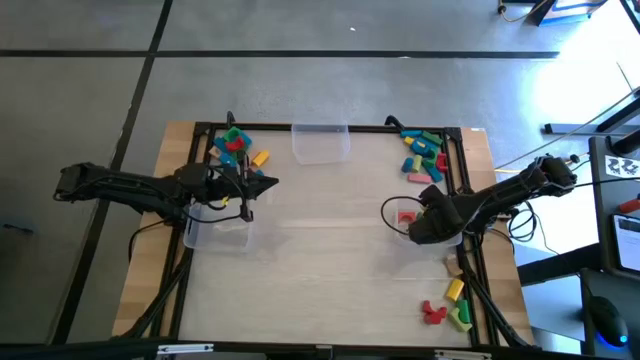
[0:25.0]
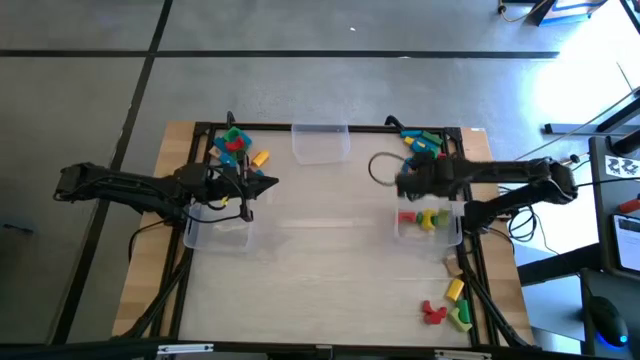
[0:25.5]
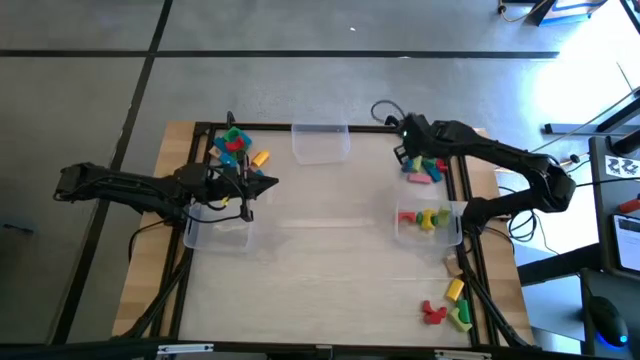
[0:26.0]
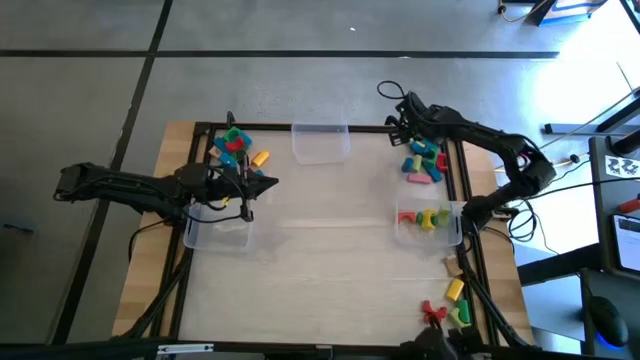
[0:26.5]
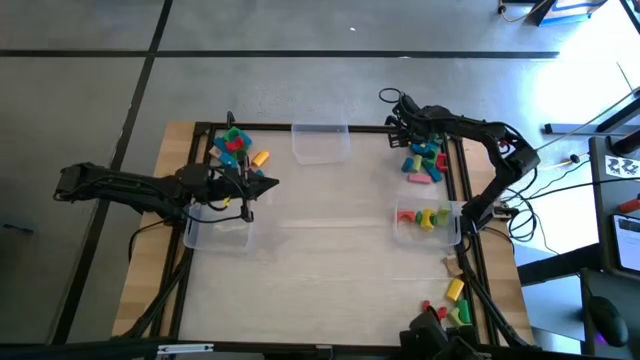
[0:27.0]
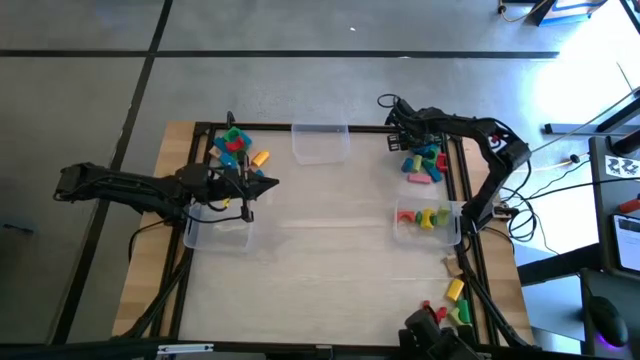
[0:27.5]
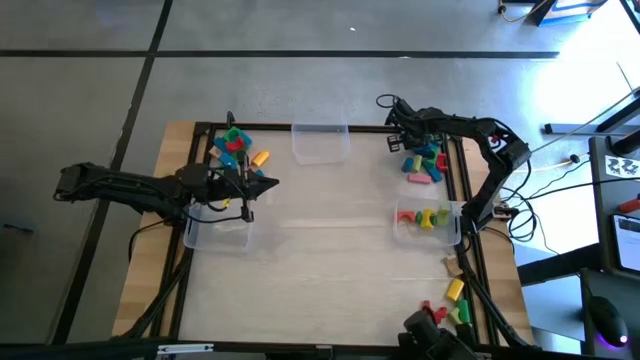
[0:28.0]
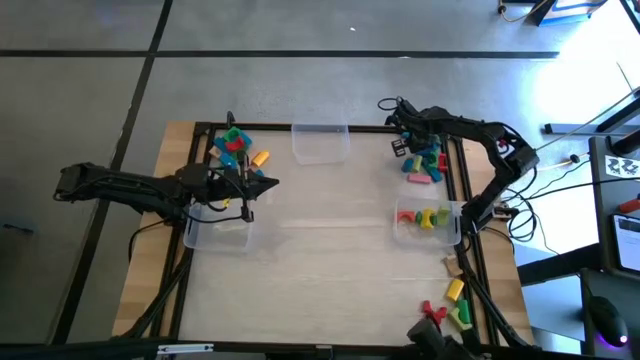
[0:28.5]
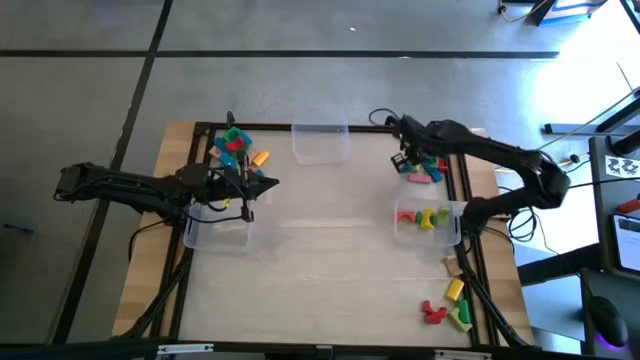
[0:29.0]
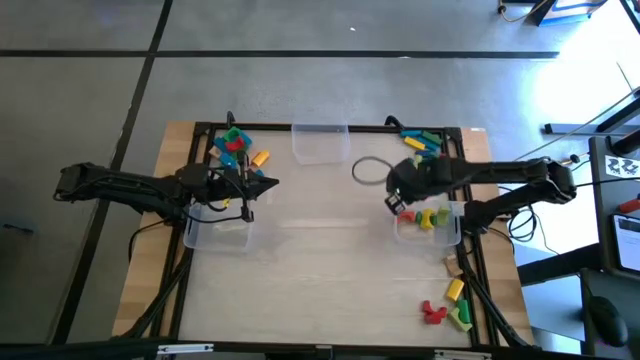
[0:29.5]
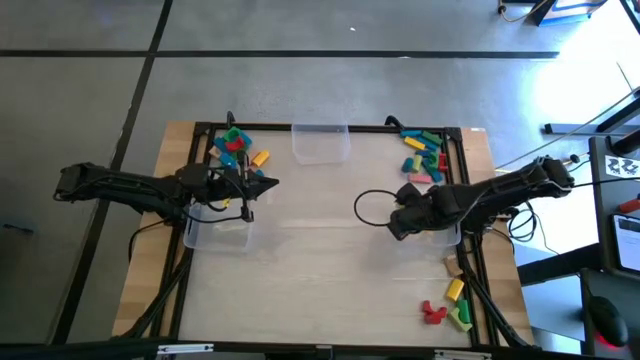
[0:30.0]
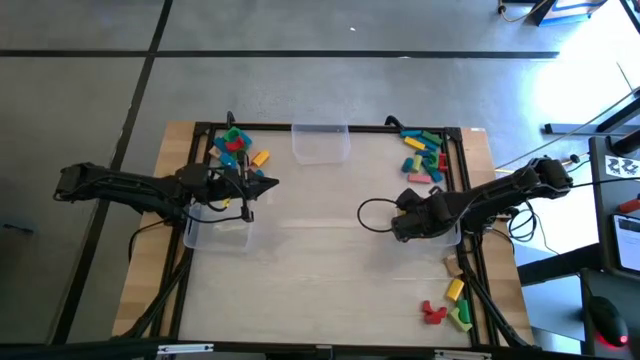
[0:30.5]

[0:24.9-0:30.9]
Task: Sort blocks by size
Put the blue arch block into the bottom right transparent bin

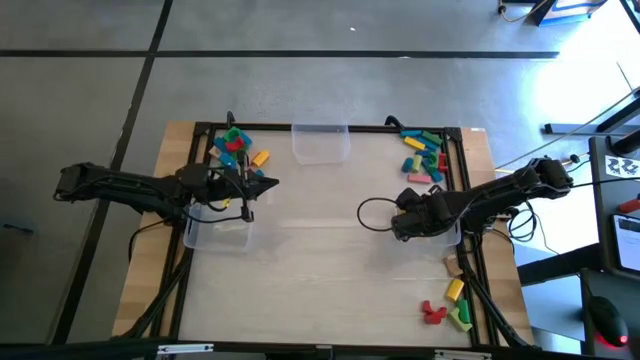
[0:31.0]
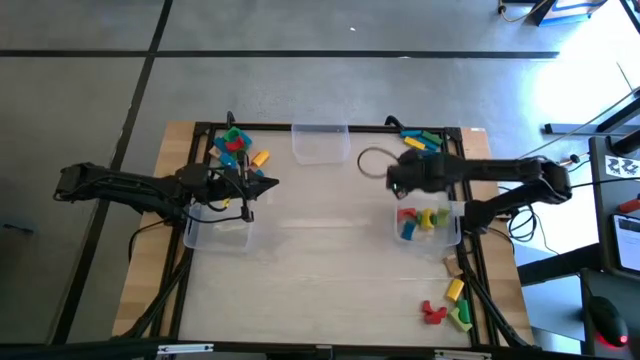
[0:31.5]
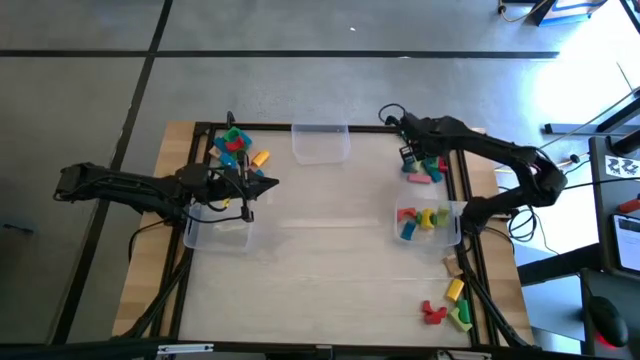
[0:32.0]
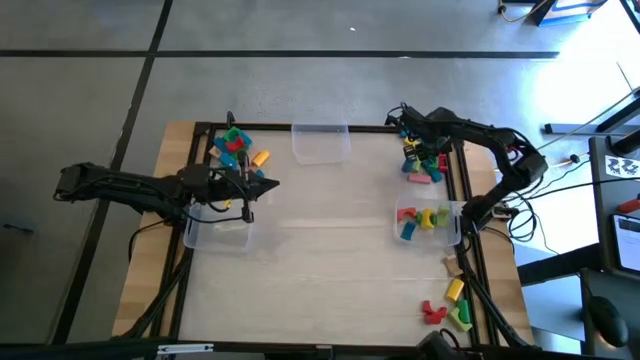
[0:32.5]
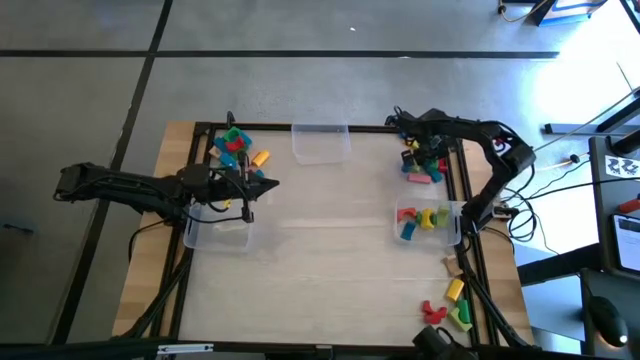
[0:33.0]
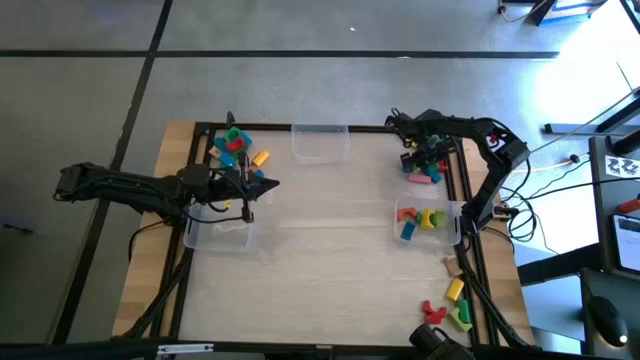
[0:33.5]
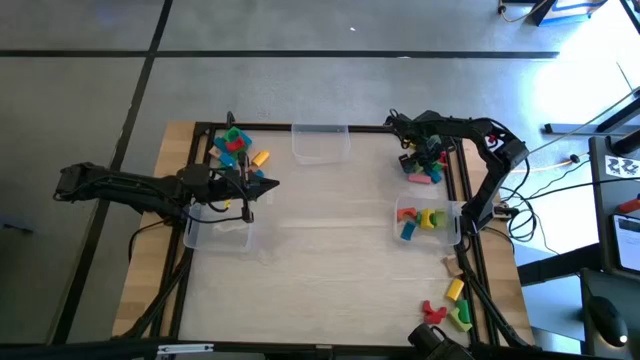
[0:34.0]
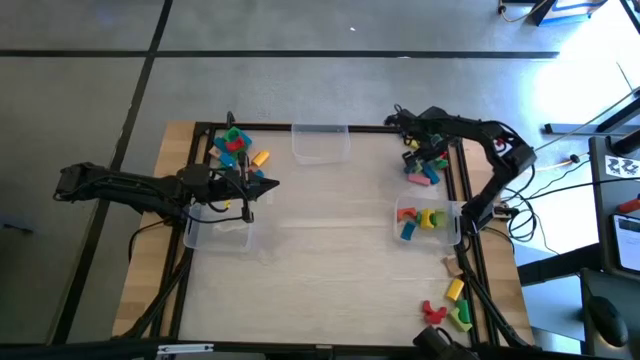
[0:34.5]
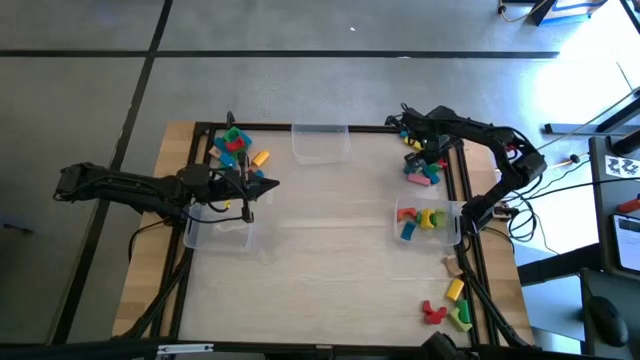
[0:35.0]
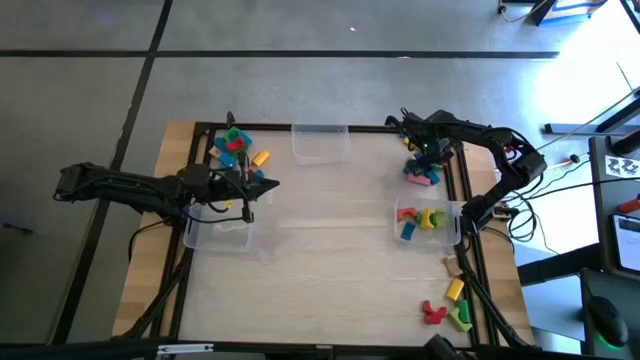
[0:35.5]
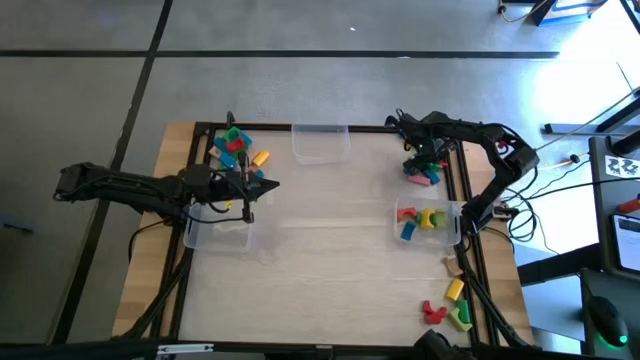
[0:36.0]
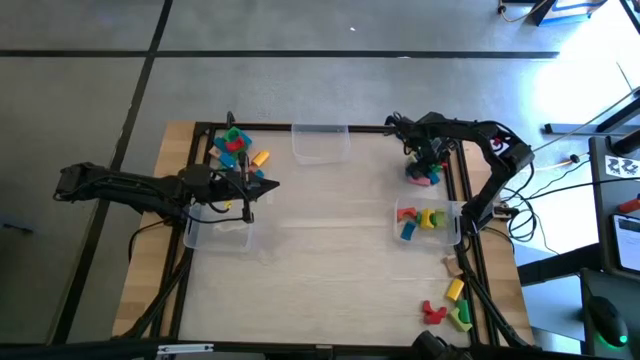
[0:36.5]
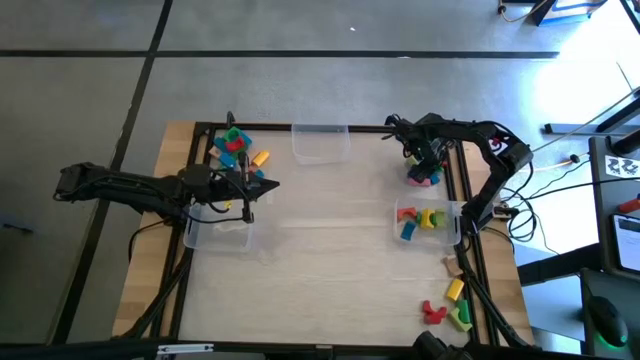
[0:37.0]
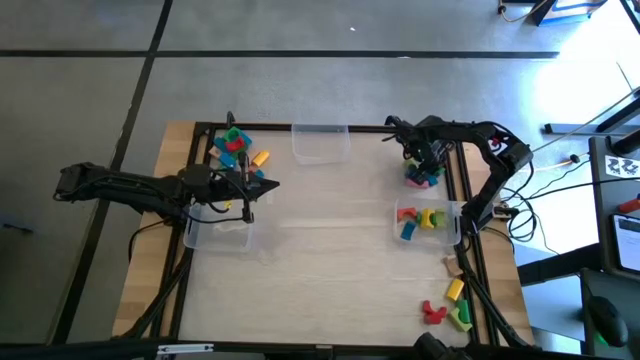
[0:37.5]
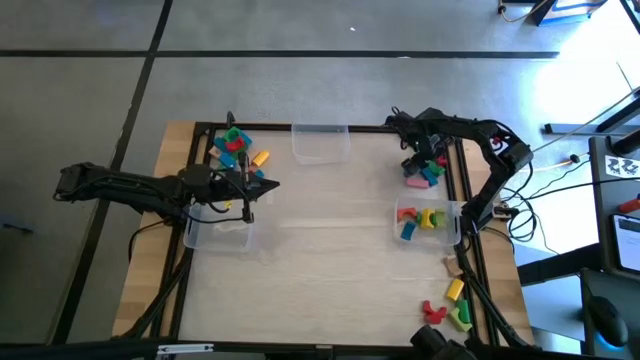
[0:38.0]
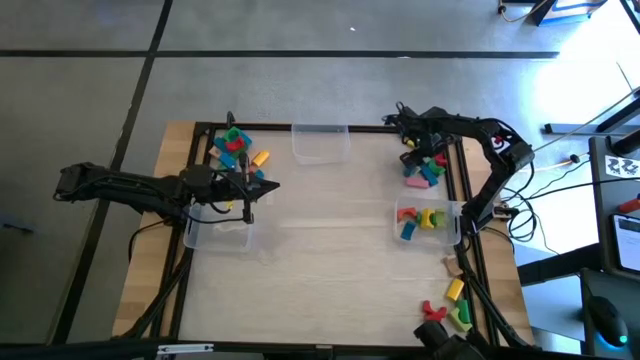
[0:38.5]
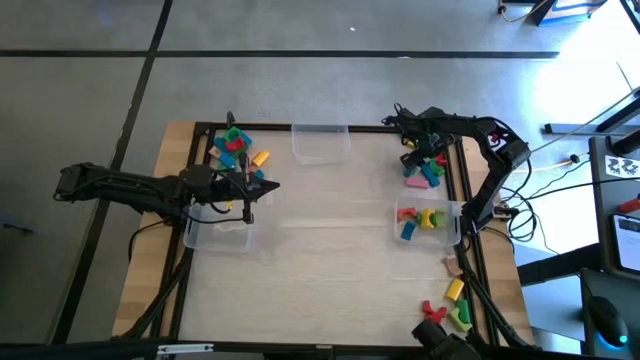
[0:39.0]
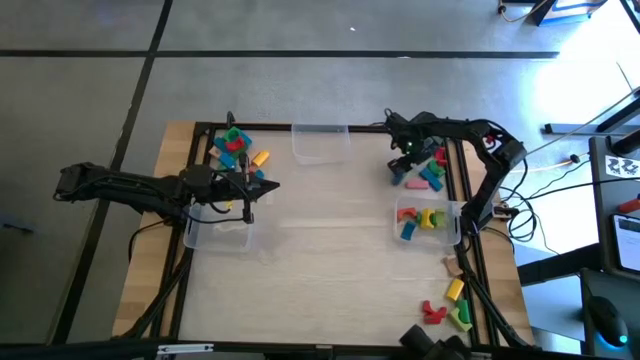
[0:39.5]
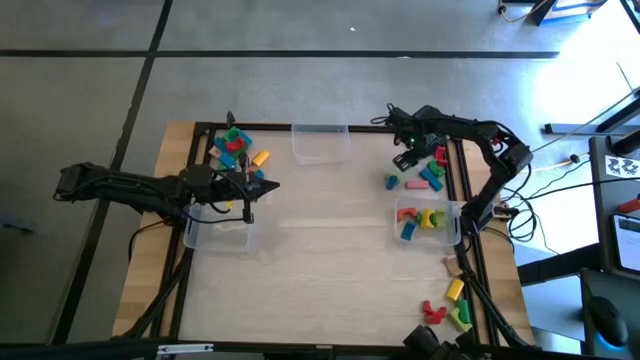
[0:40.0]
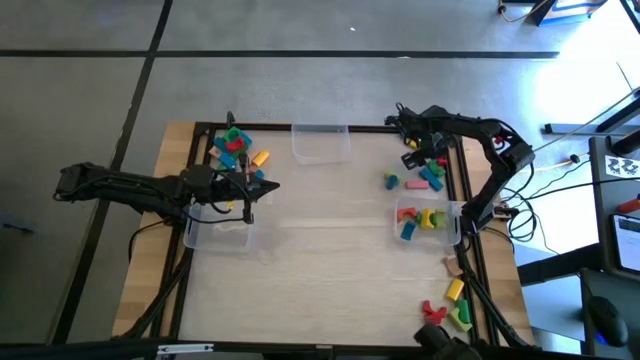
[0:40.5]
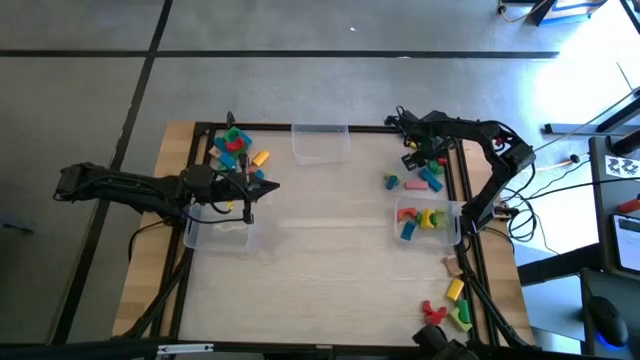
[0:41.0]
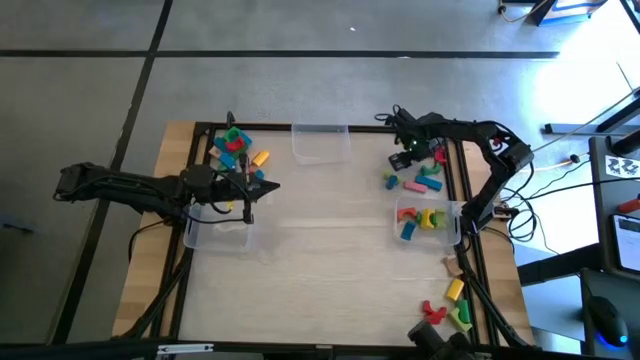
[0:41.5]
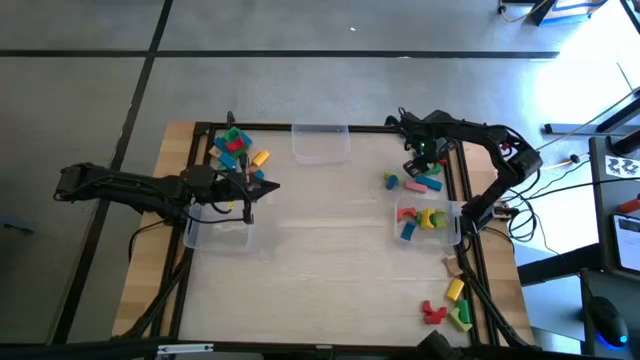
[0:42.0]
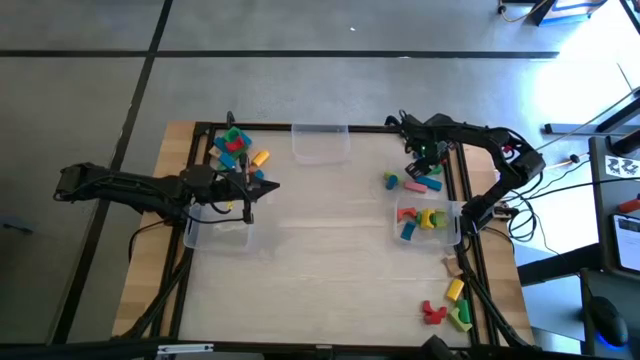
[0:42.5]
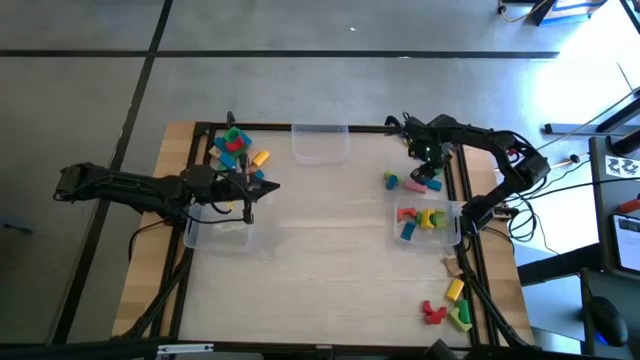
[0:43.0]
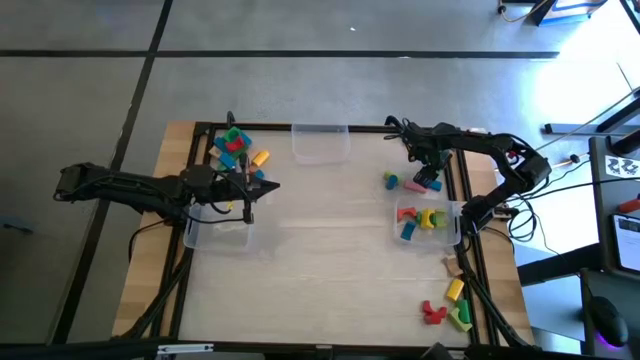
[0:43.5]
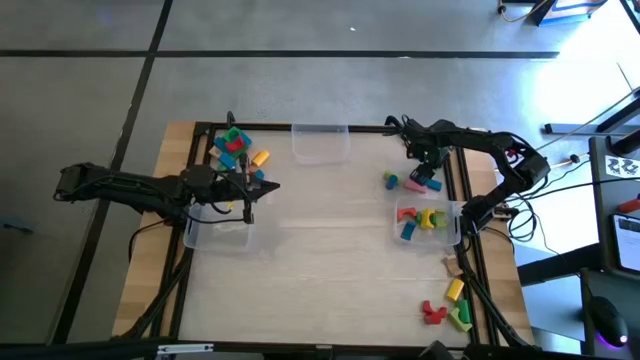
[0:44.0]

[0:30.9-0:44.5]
Put the green arch block into the bottom right transparent bin

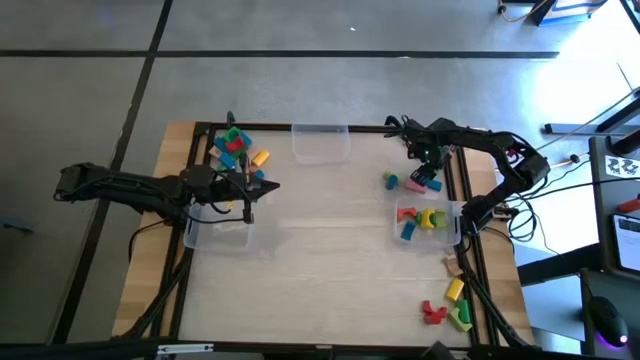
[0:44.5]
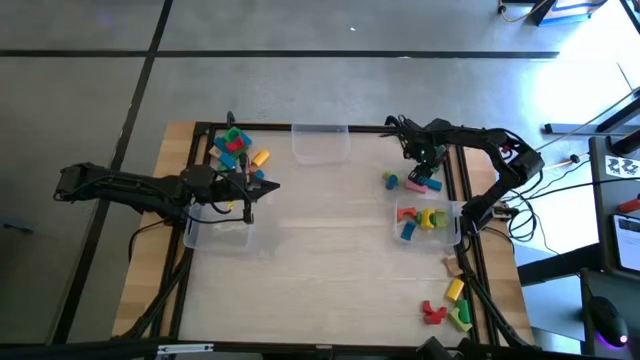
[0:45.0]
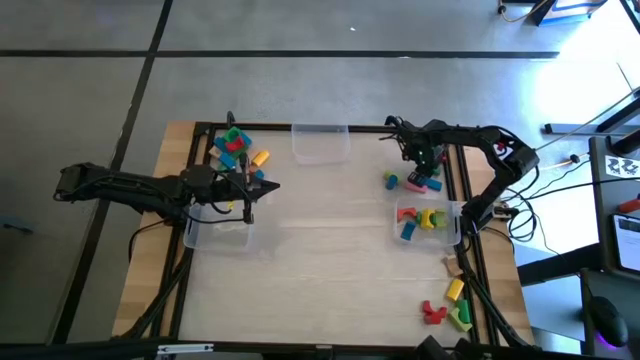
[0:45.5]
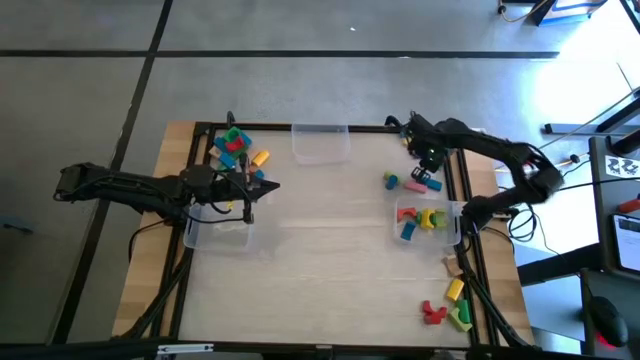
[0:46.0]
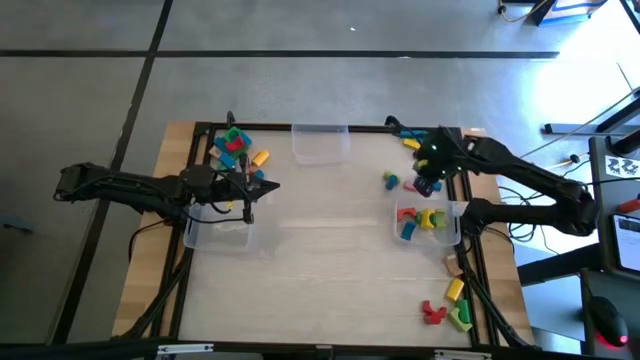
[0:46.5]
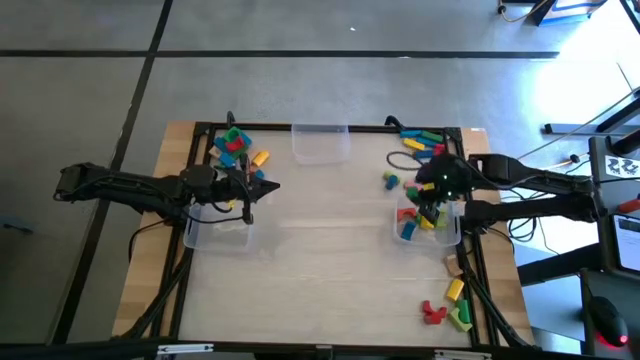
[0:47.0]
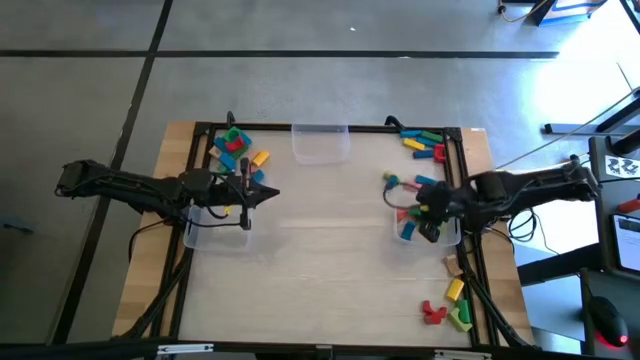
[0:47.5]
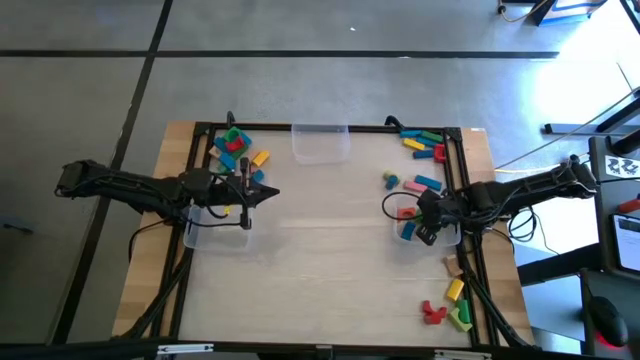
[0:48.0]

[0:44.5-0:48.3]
Put the green arch block into the bottom right transparent bin
